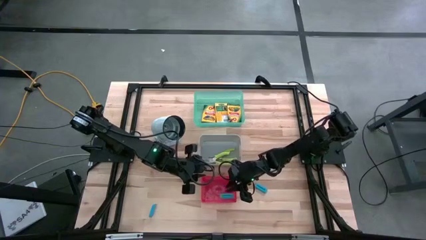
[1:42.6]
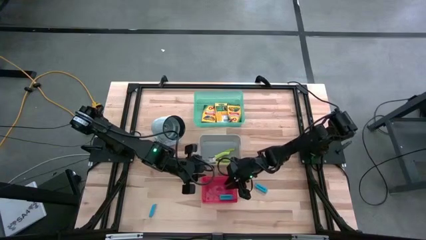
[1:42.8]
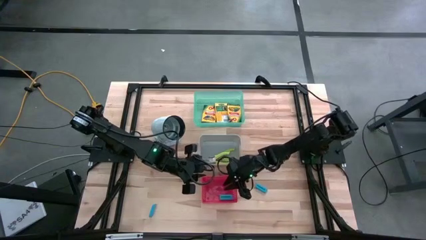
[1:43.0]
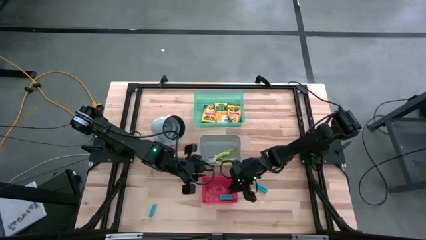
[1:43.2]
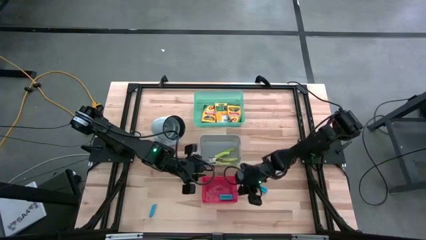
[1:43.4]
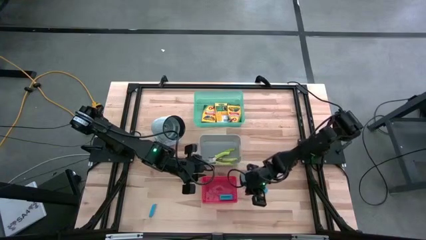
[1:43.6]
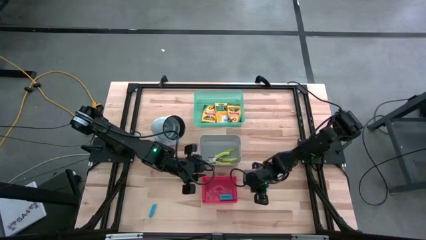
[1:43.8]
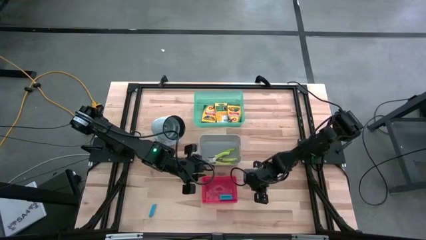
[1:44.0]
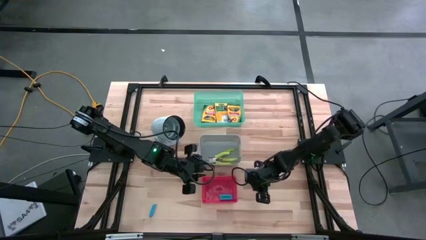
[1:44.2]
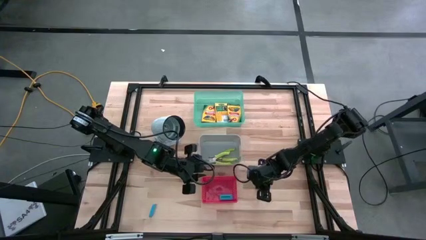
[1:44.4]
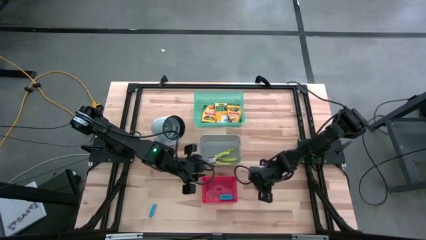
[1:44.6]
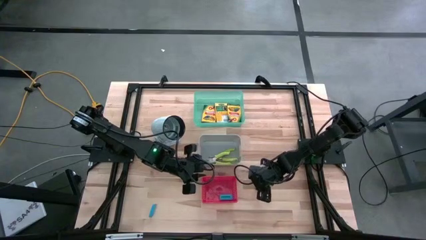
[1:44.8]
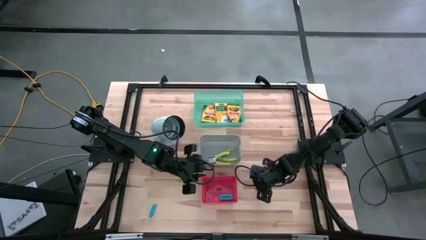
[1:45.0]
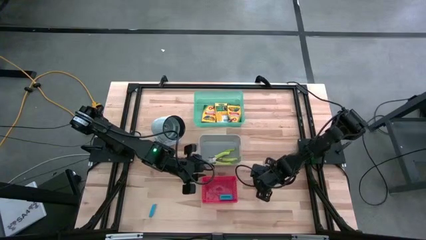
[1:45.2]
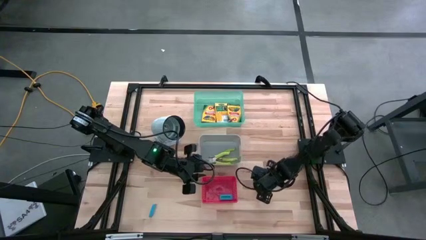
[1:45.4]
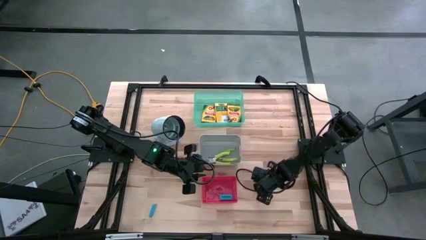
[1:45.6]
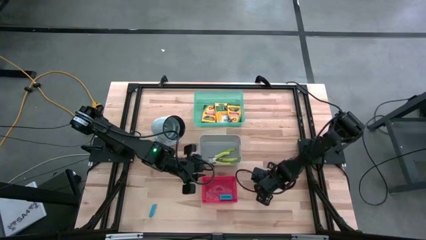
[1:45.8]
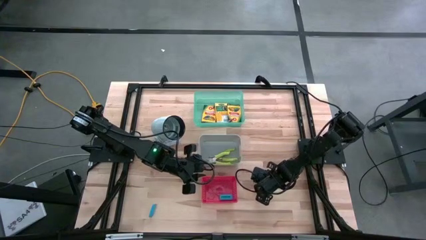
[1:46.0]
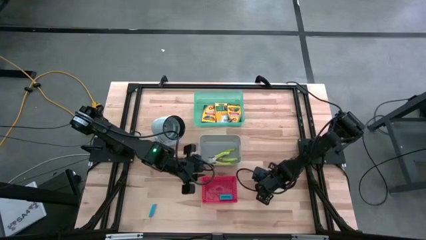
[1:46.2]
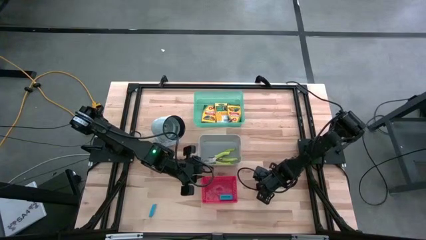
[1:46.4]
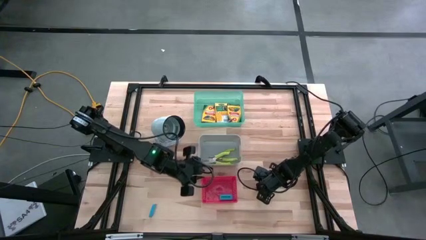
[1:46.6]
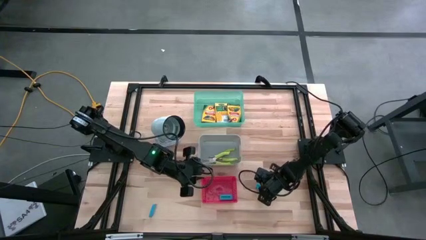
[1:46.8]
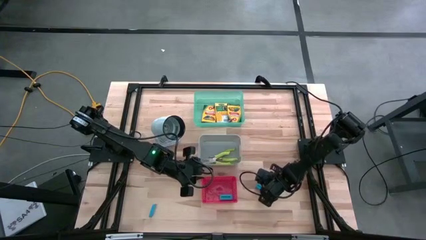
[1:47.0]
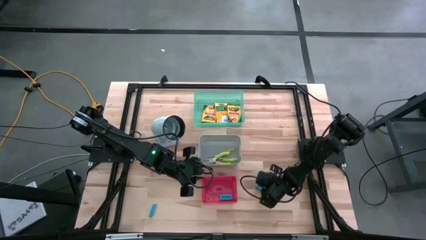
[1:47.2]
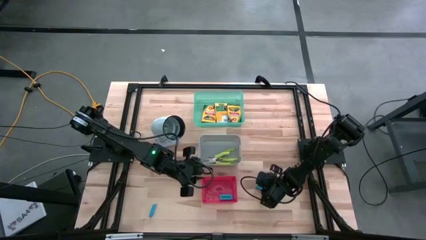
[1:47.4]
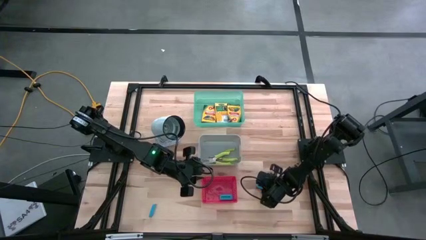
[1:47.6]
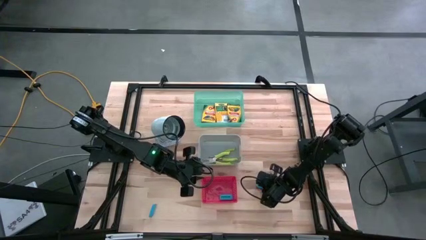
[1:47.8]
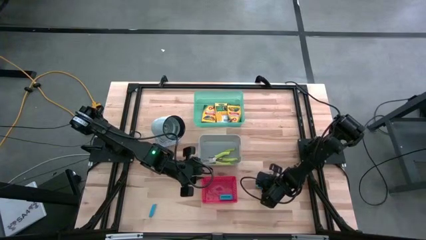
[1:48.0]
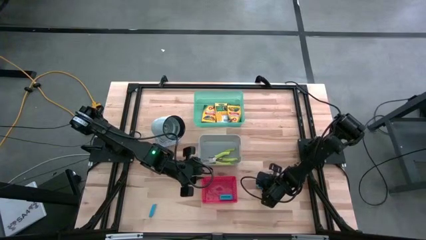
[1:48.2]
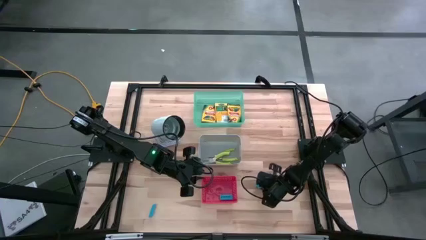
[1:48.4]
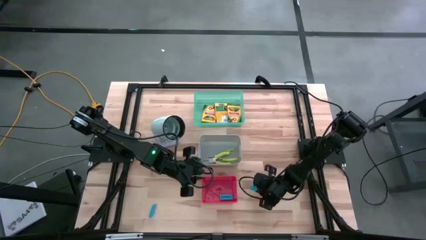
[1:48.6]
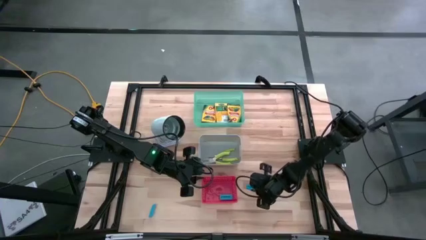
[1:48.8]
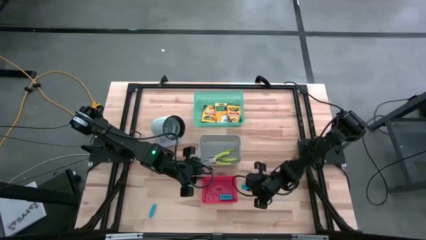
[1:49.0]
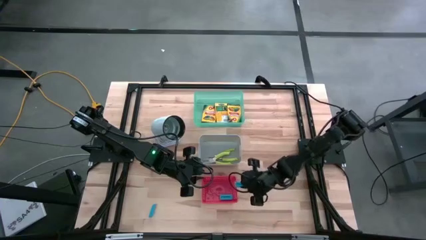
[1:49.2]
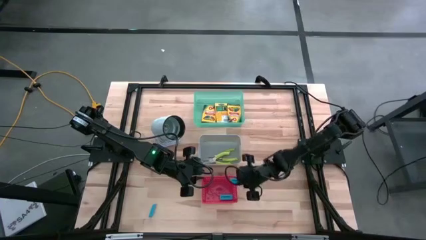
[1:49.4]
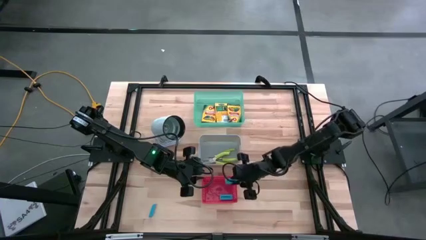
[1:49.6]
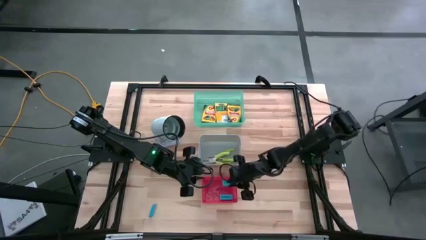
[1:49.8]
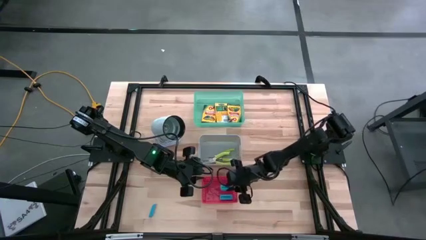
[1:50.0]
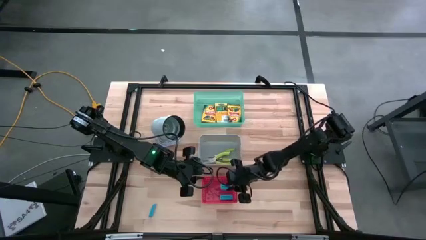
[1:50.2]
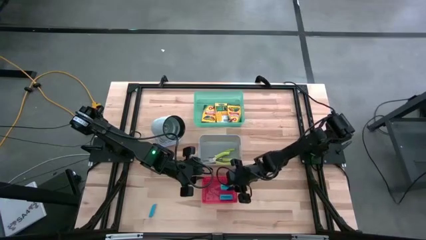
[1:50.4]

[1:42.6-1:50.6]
Task: Pick & Place School Supplies
Put the blue eraser into the red bin

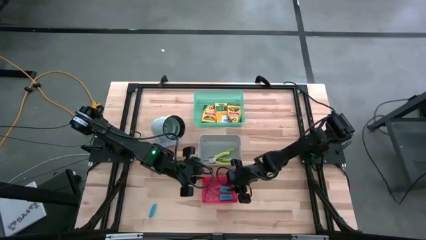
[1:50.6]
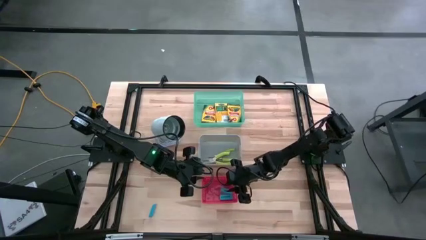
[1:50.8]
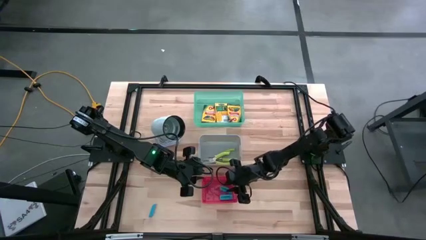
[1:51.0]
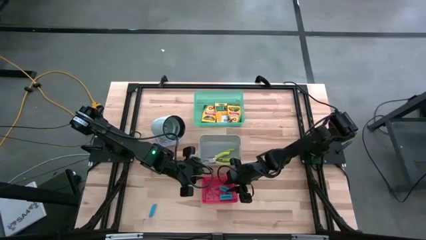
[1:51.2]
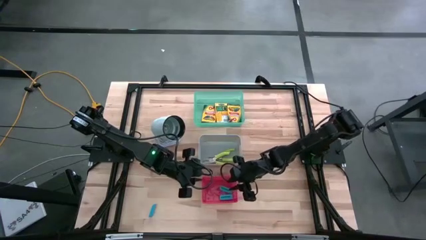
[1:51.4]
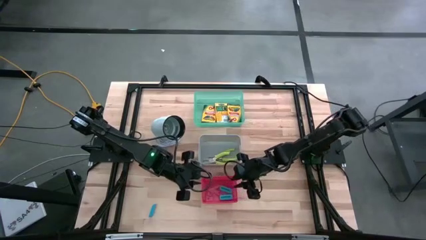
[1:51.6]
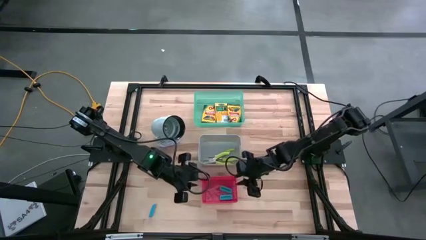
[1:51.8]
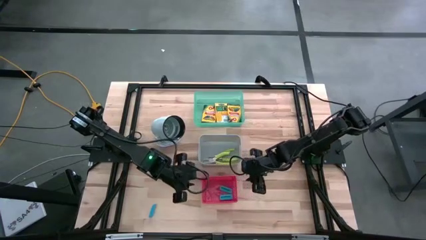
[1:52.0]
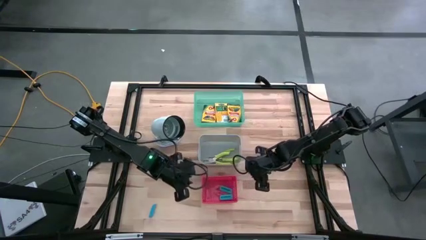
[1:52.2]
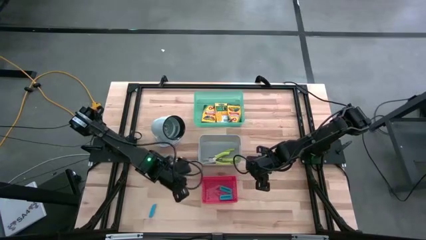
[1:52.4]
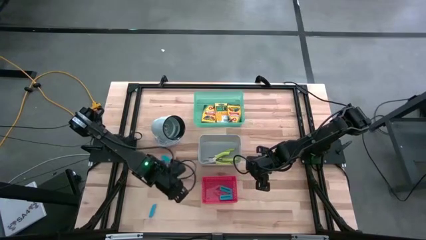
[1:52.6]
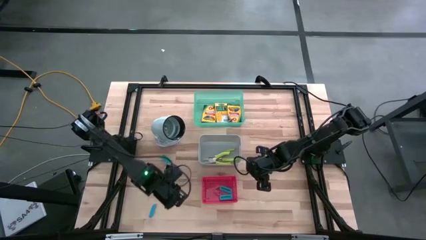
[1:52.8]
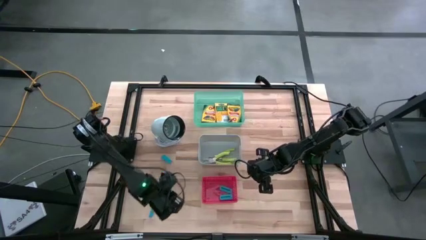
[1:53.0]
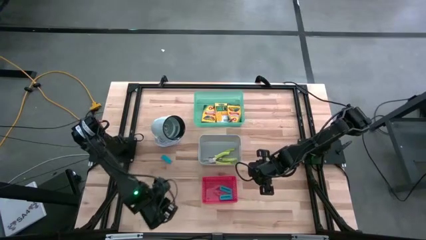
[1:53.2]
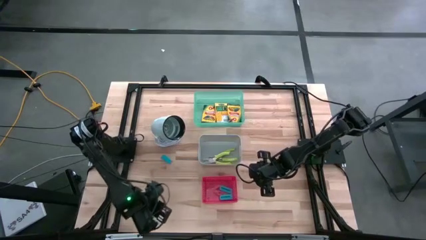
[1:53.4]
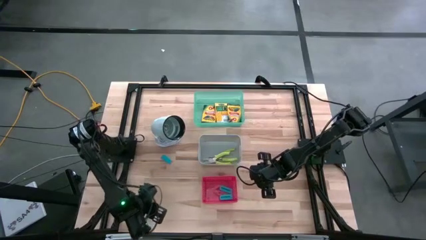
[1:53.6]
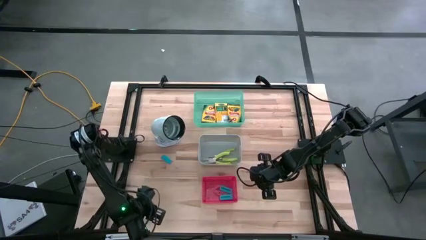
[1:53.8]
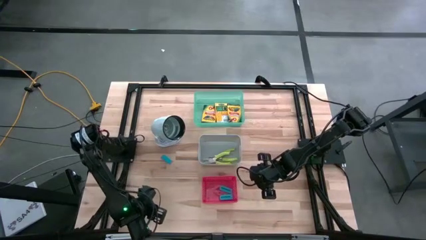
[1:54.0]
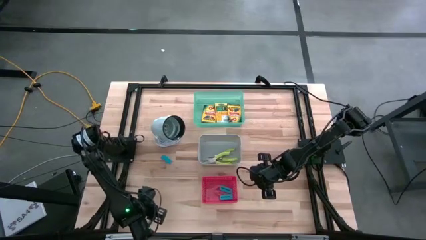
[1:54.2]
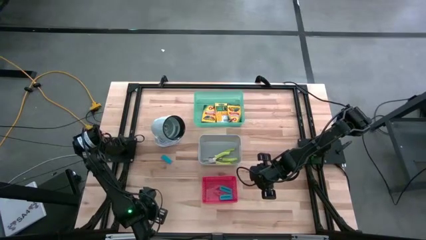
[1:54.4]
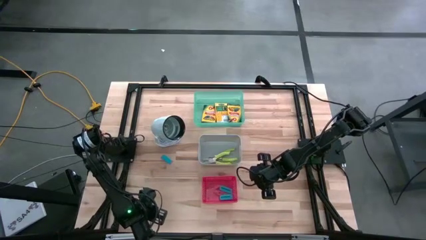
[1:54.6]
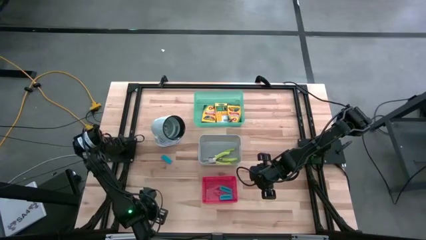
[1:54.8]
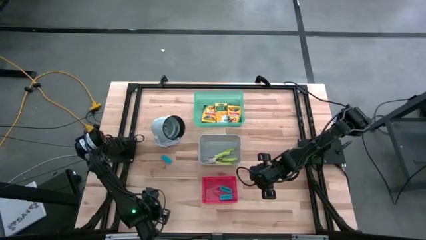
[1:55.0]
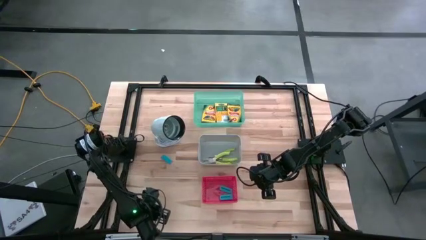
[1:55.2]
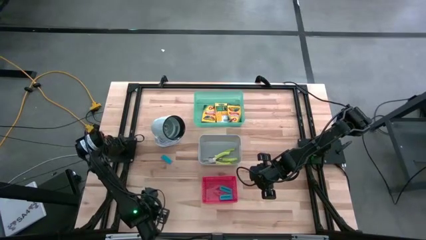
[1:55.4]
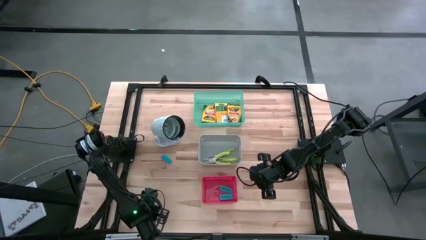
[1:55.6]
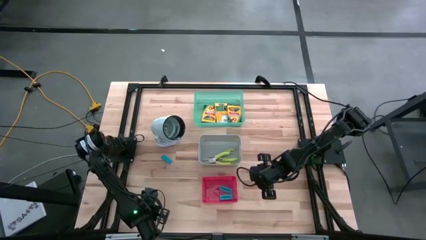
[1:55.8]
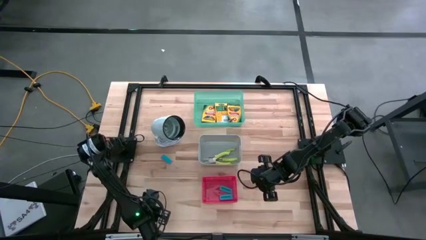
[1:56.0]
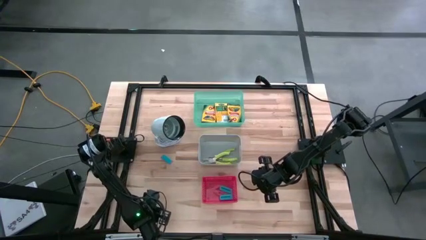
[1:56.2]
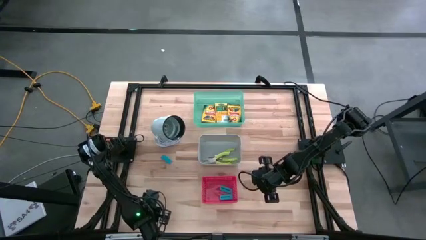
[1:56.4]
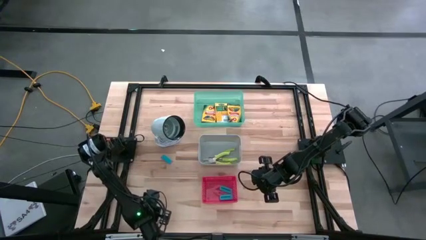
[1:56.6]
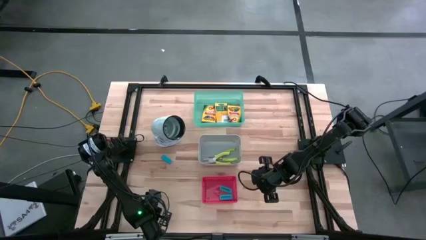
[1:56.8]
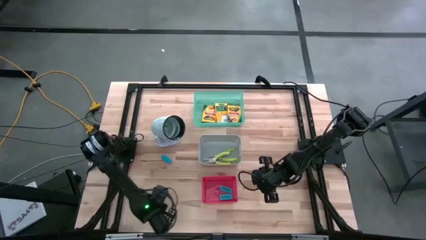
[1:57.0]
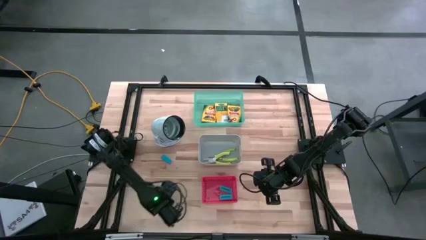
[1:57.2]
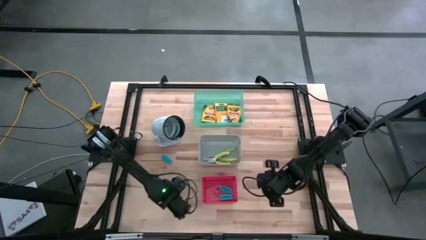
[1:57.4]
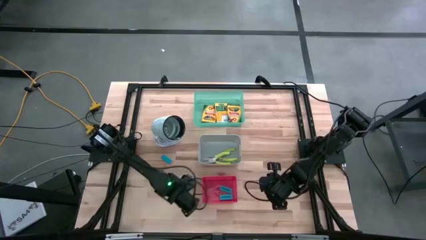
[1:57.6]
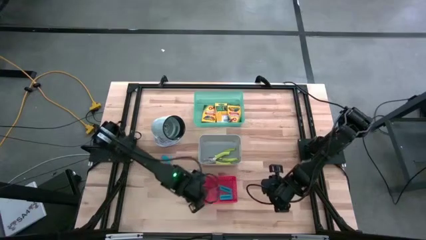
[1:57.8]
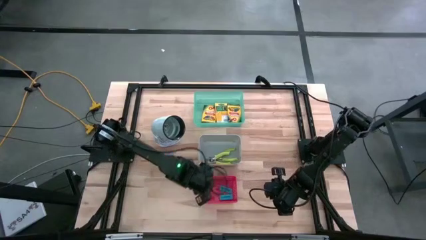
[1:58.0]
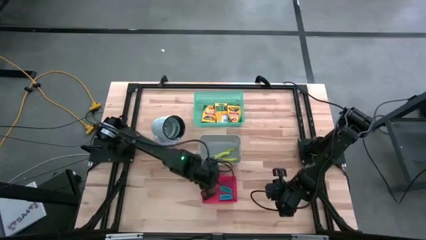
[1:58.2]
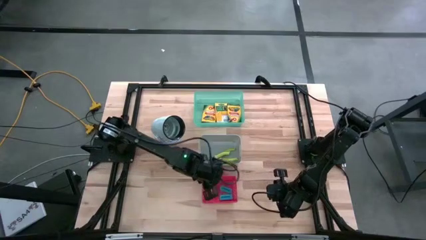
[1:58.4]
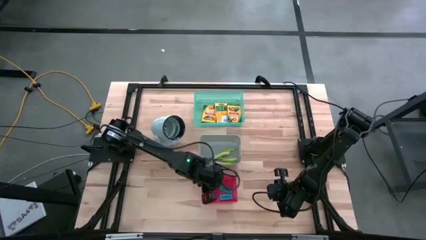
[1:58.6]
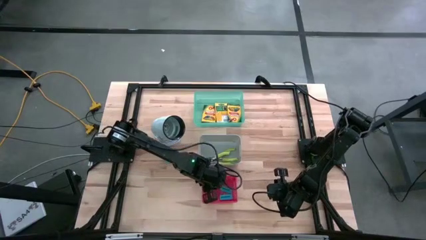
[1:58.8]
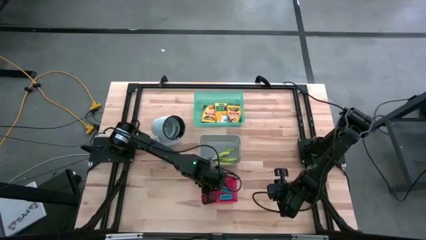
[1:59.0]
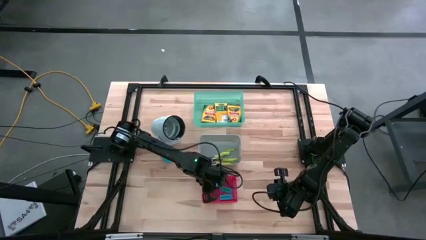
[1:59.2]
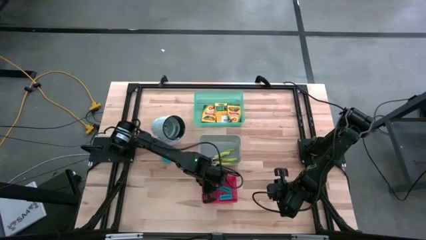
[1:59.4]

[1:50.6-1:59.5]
Put the blue eraser into the red bin
